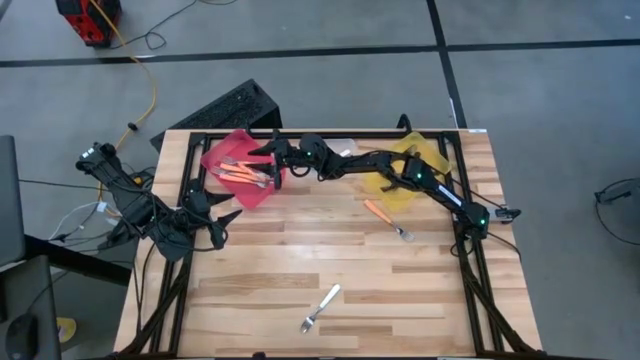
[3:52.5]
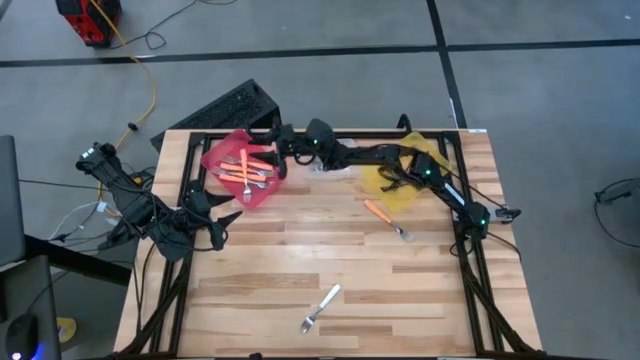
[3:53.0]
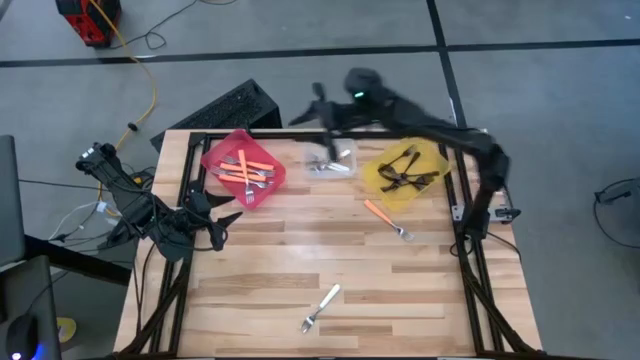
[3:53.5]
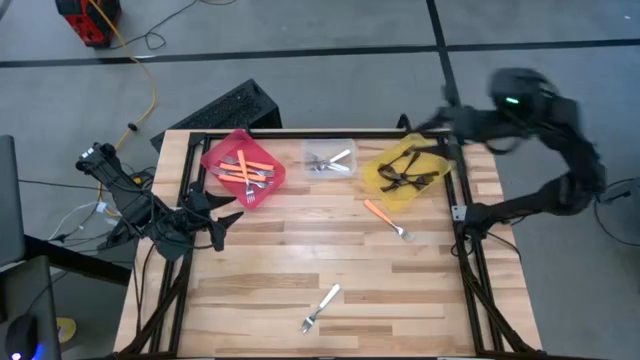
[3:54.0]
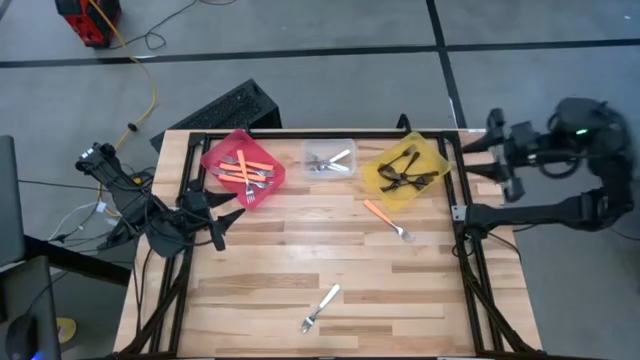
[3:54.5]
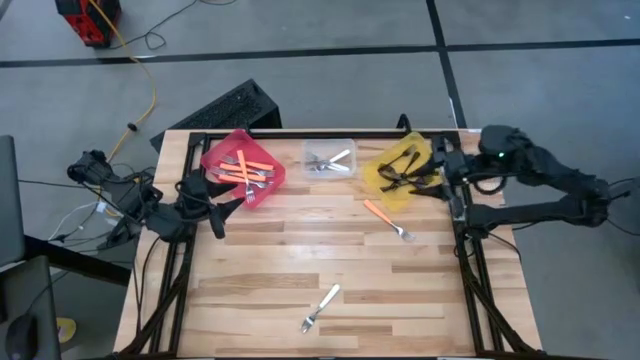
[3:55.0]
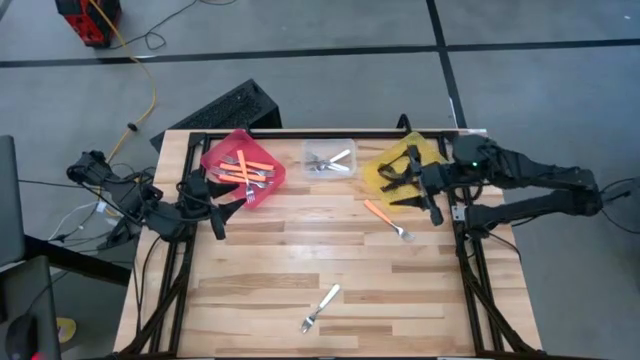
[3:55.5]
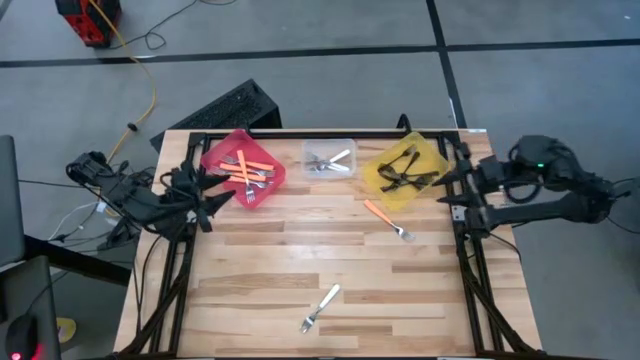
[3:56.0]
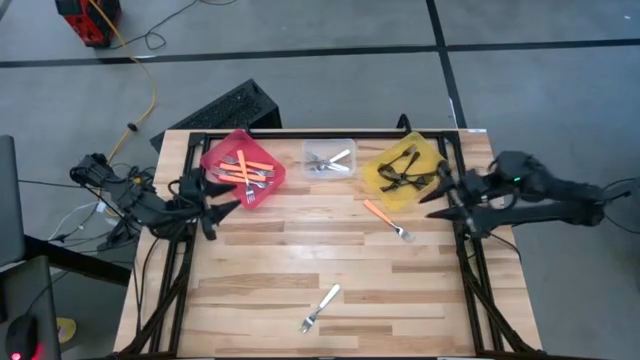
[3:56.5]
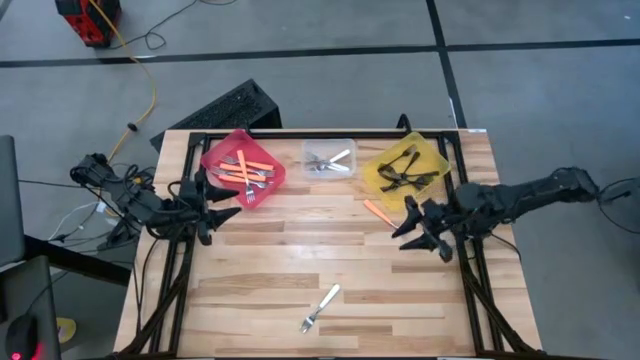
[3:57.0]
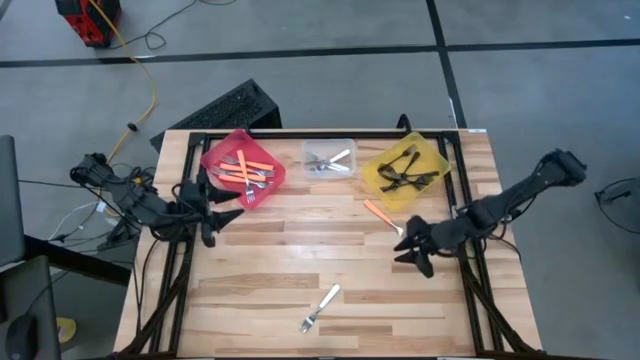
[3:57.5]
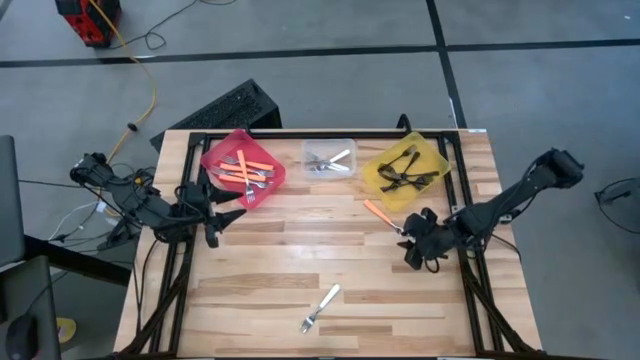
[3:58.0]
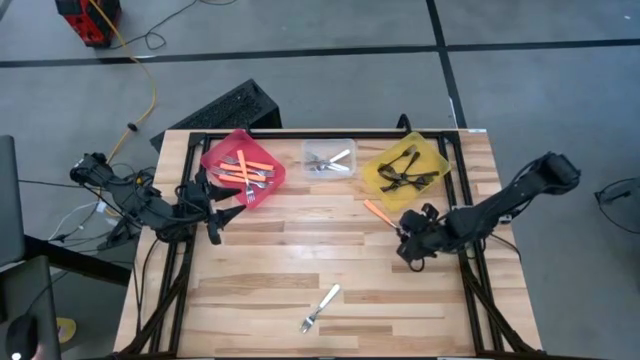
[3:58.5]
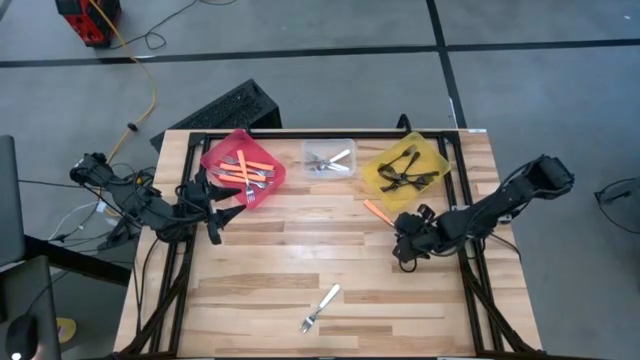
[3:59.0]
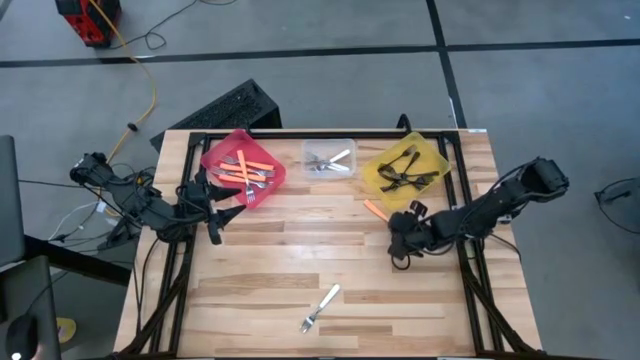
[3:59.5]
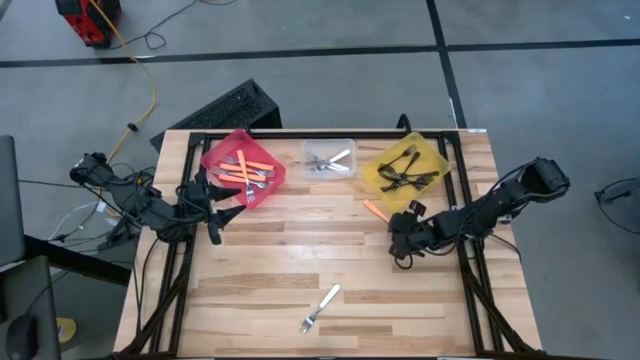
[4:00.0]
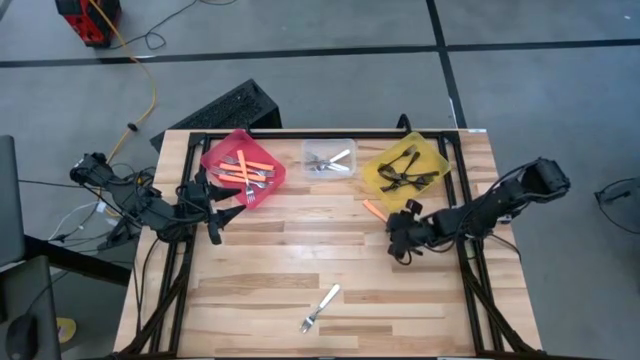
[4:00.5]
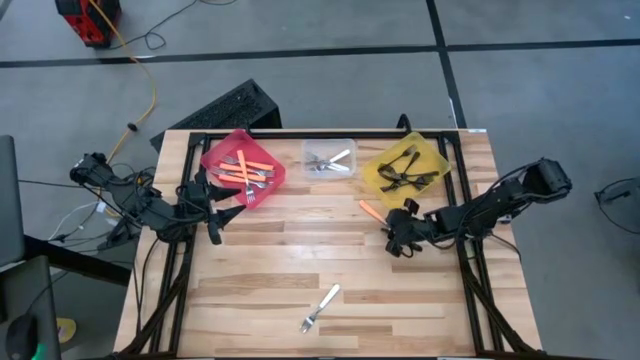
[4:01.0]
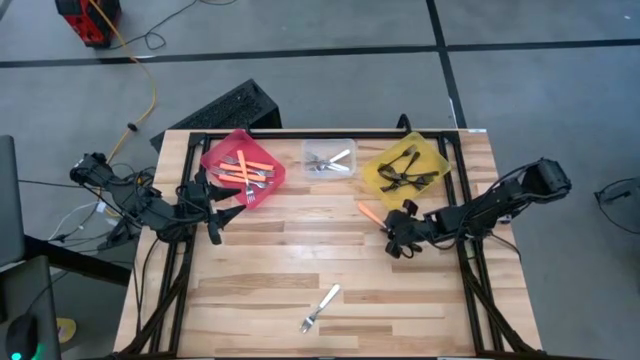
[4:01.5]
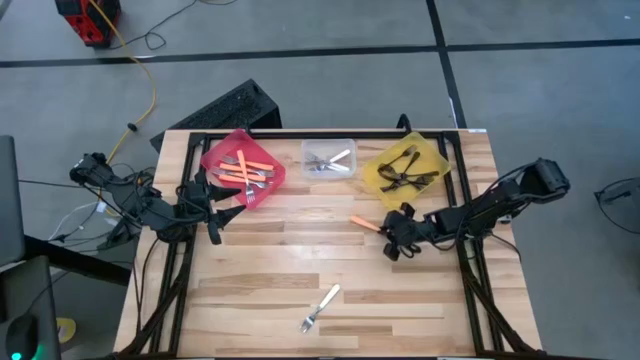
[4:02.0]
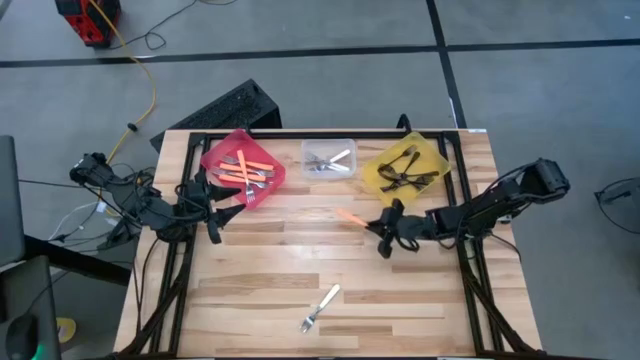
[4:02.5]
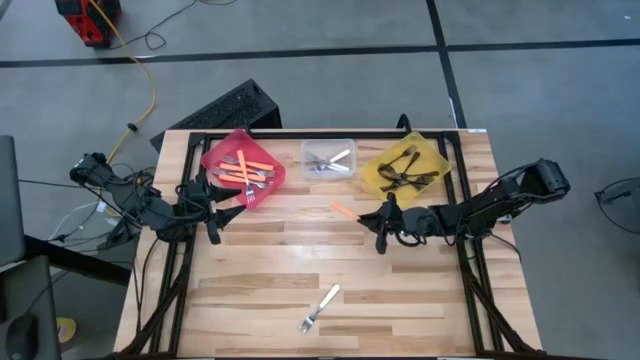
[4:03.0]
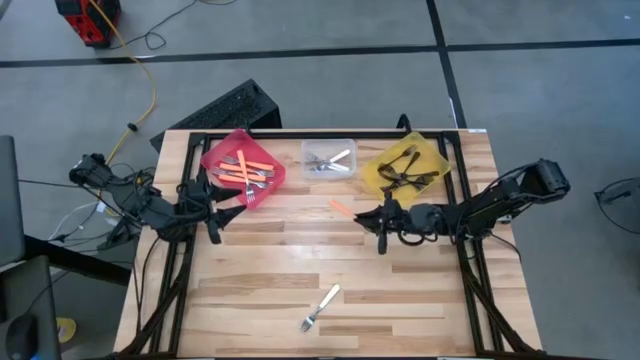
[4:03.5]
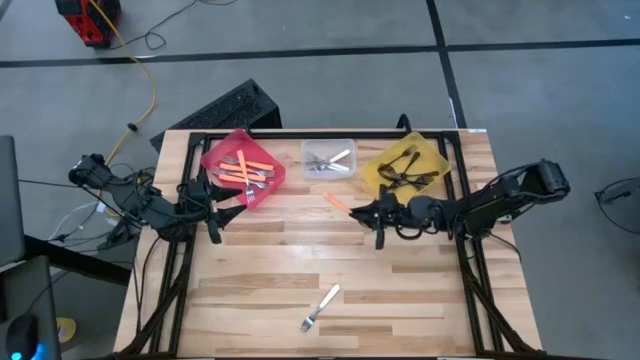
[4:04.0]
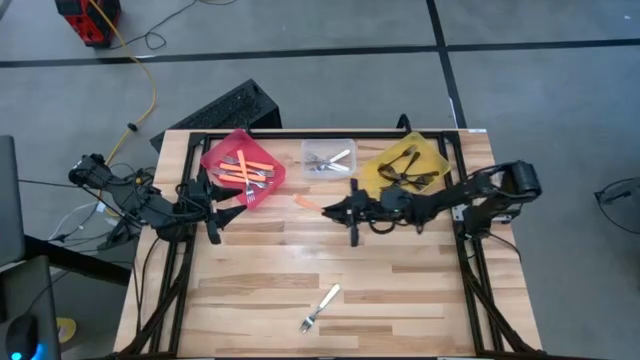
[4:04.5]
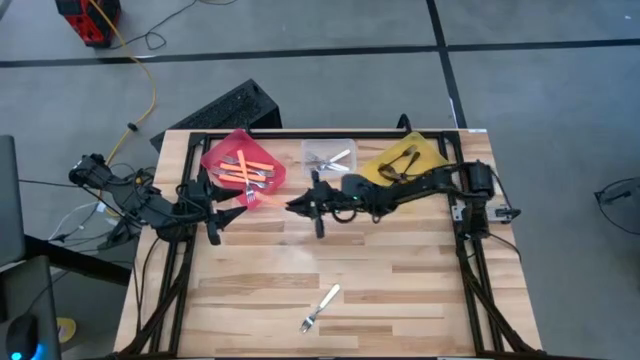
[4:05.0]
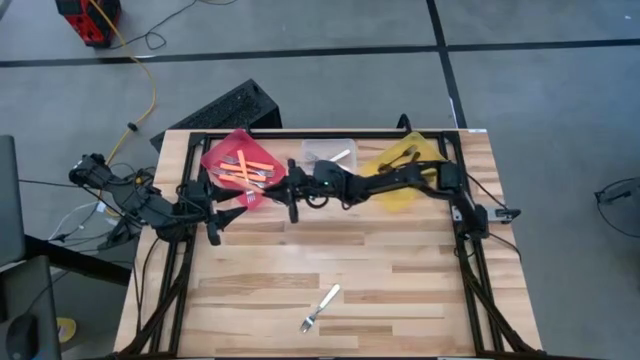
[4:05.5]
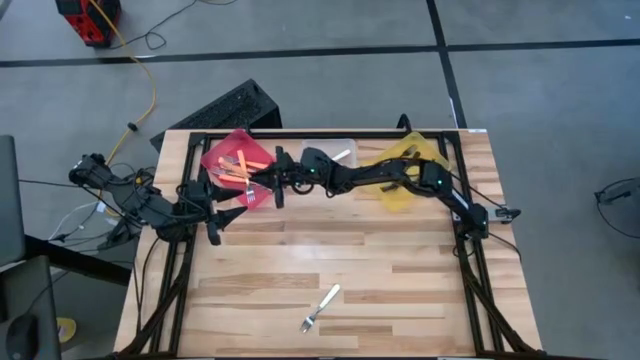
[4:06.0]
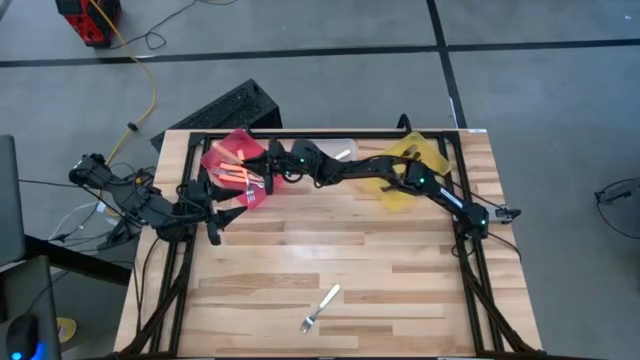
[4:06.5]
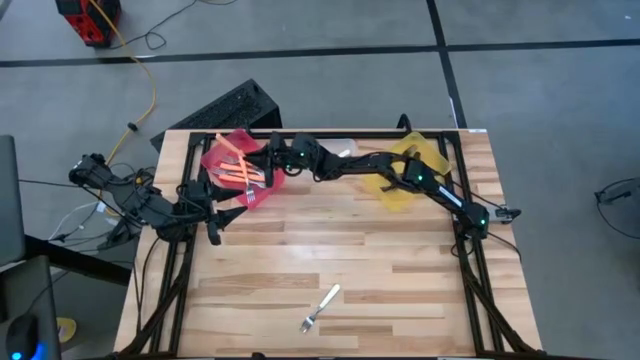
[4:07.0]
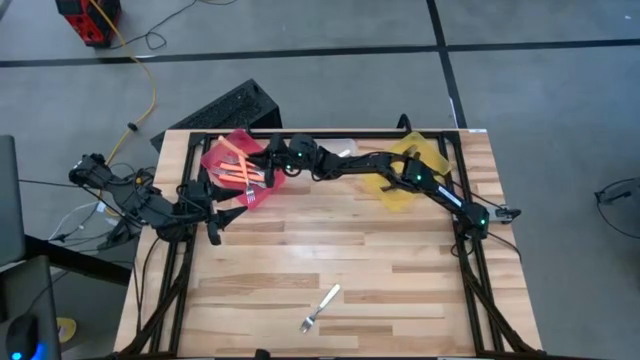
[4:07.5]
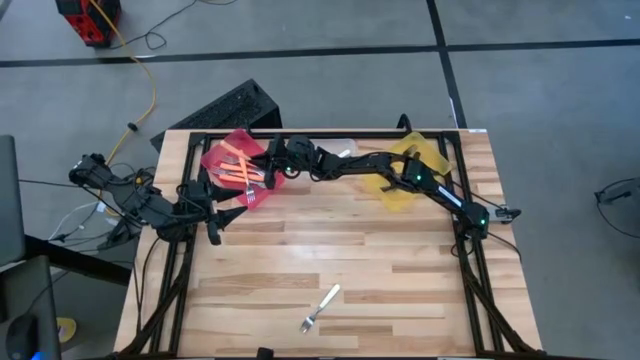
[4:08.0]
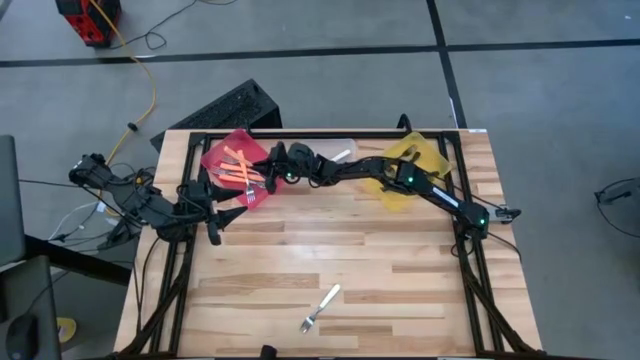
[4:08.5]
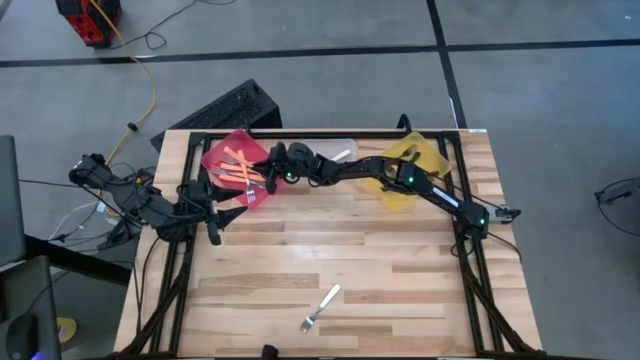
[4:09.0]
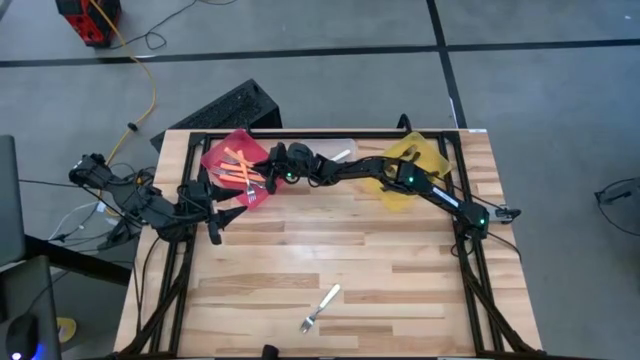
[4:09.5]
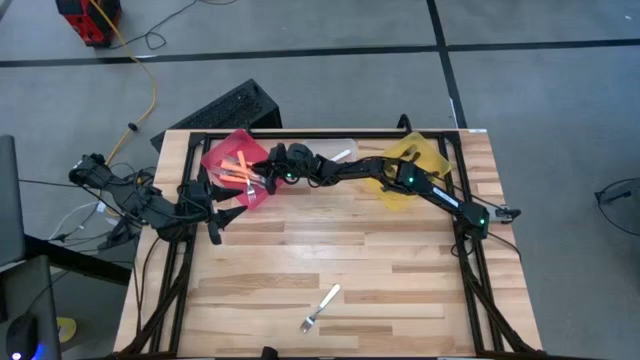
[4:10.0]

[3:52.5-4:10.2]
Task: Sort silverware by color (type)
Put the orange fork into the red bin

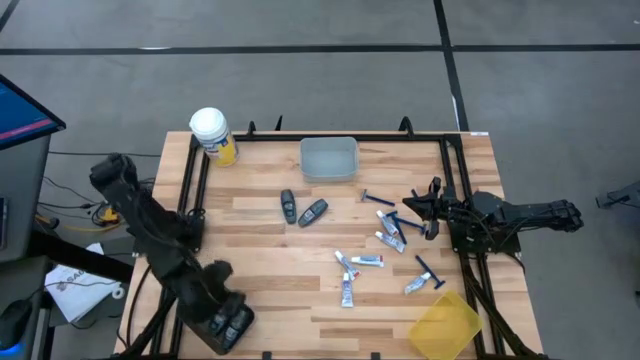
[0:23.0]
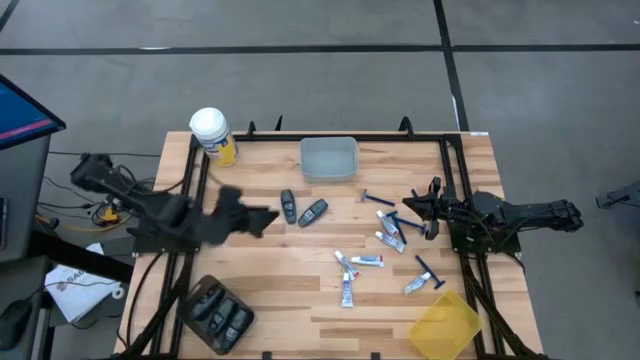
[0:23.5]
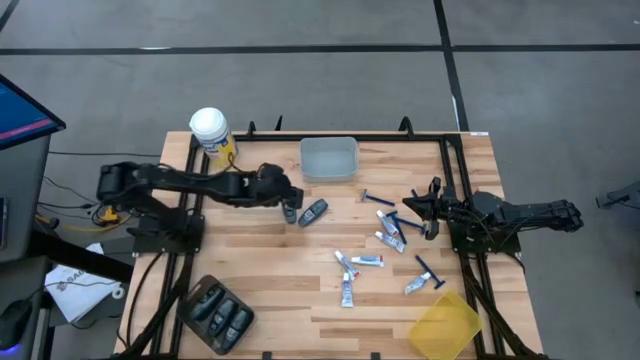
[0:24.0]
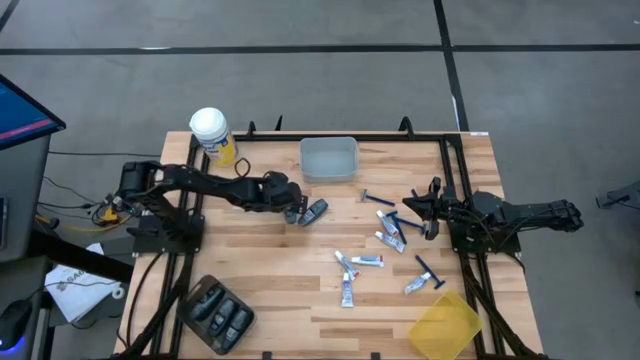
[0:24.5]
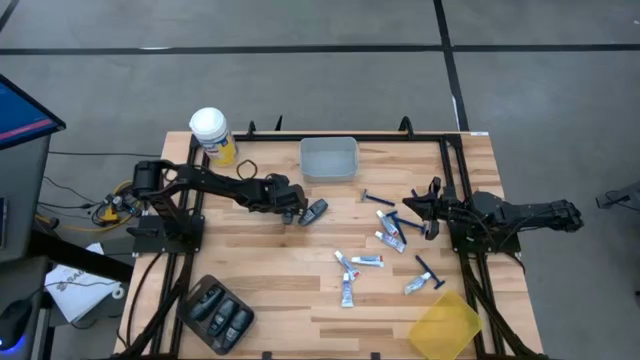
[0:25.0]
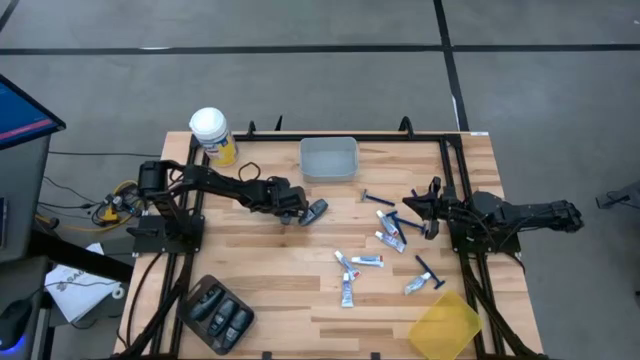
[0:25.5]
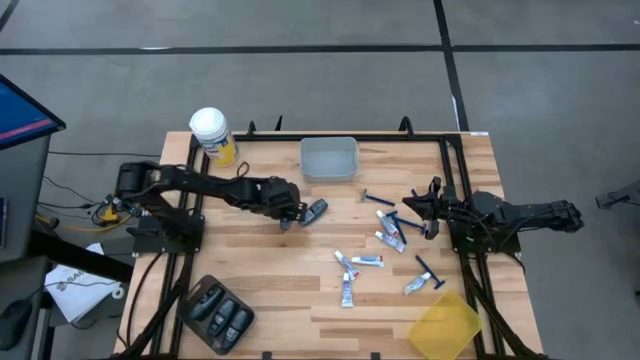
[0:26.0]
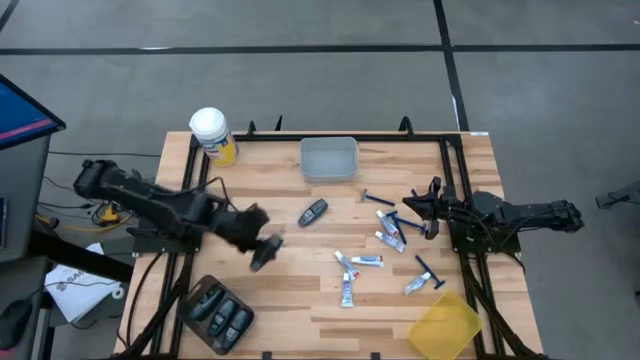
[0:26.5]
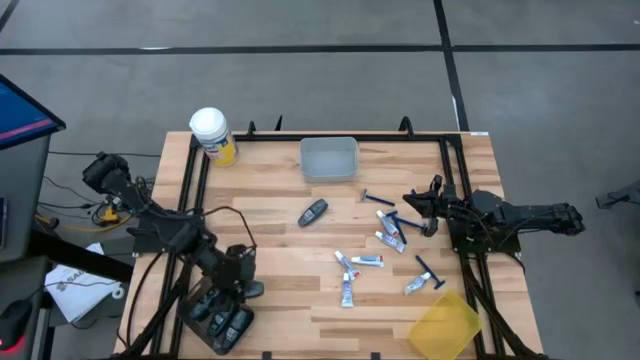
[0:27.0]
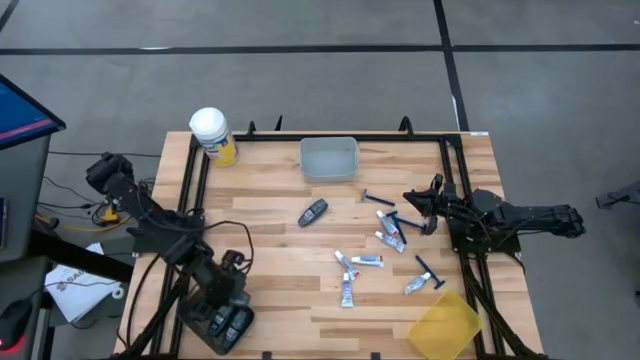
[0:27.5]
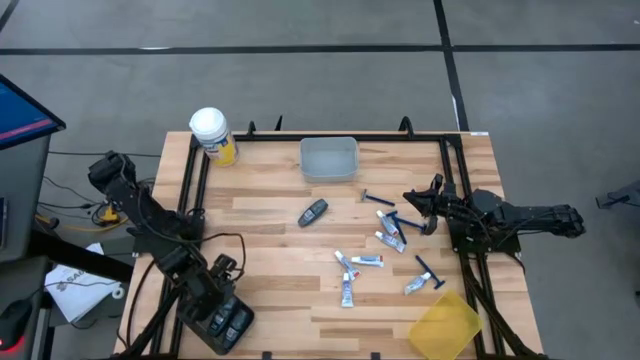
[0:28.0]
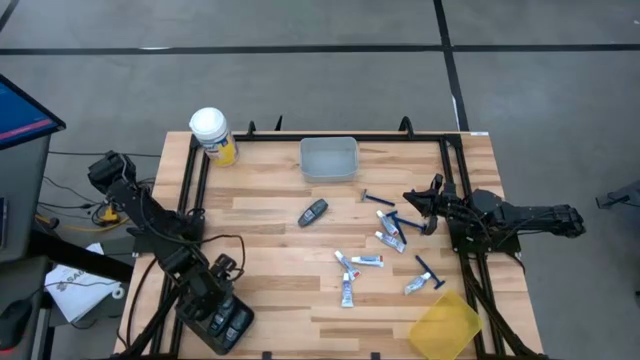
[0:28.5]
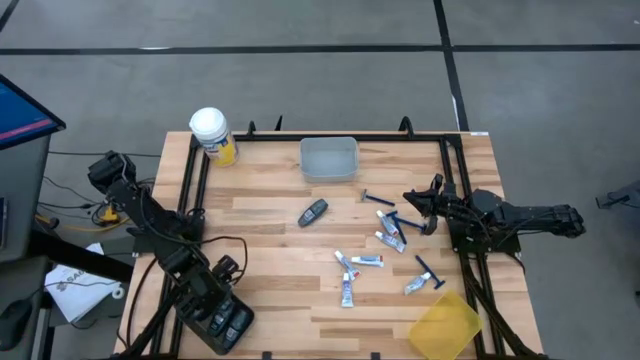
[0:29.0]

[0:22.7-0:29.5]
Task: Pick & Place Travel size toiletries
Put the black deodorant into the black bin
